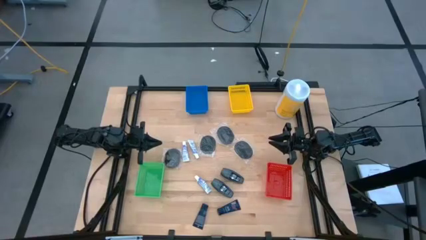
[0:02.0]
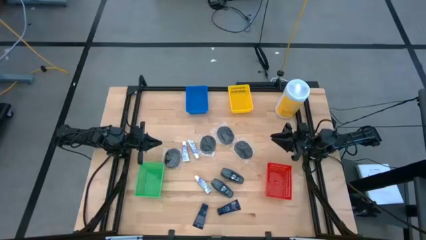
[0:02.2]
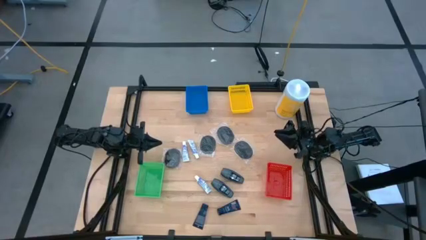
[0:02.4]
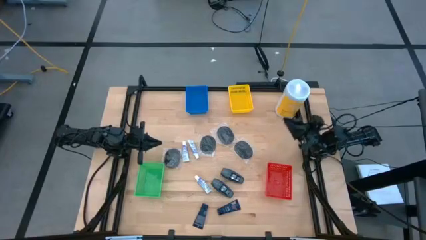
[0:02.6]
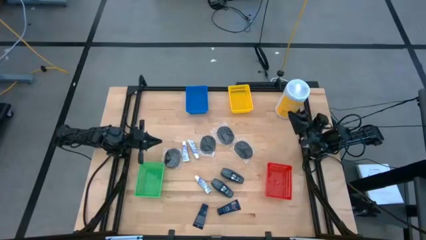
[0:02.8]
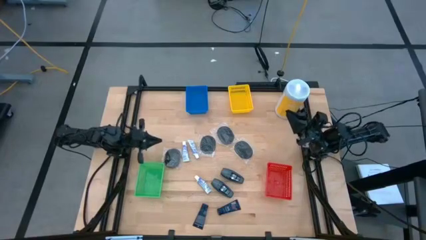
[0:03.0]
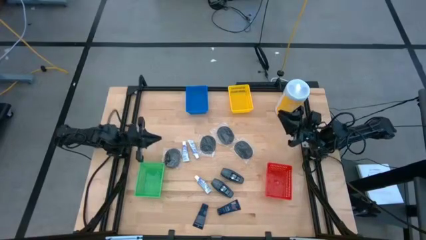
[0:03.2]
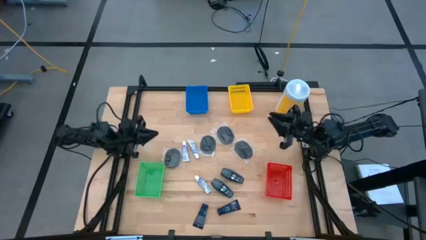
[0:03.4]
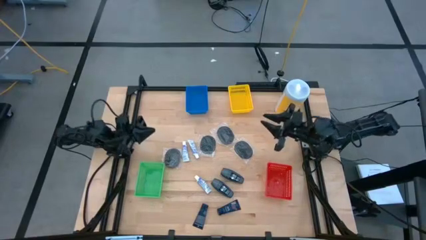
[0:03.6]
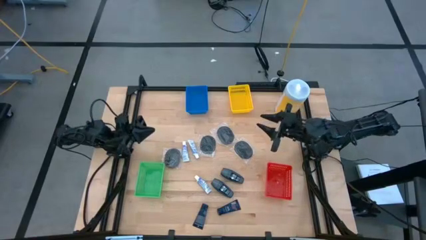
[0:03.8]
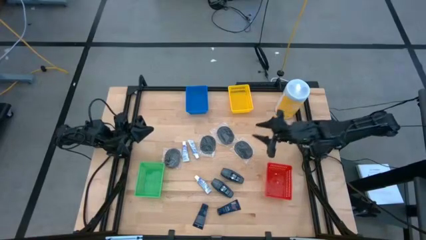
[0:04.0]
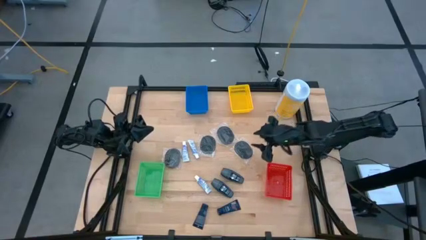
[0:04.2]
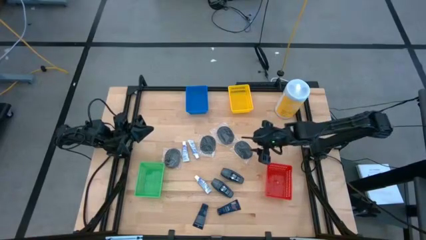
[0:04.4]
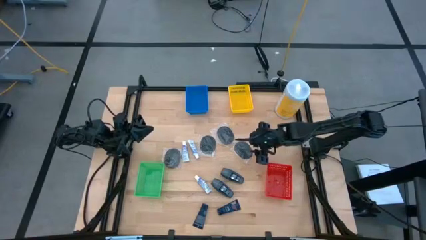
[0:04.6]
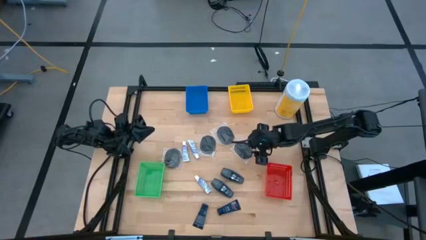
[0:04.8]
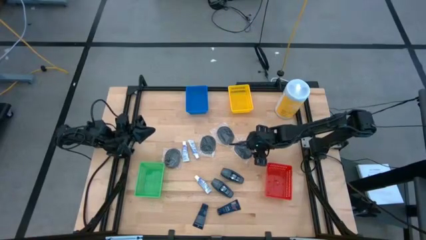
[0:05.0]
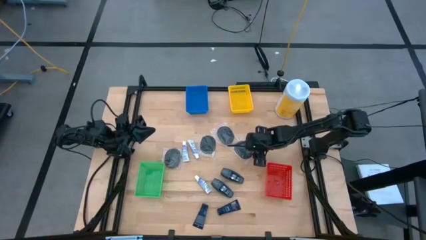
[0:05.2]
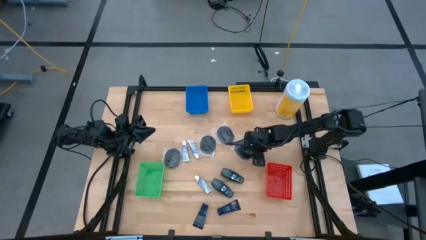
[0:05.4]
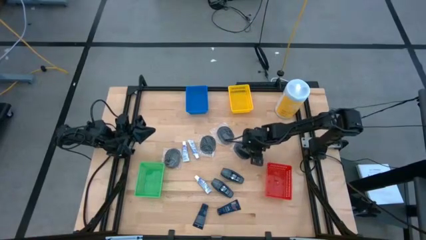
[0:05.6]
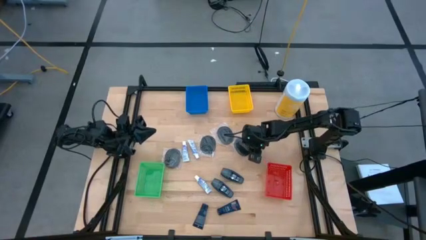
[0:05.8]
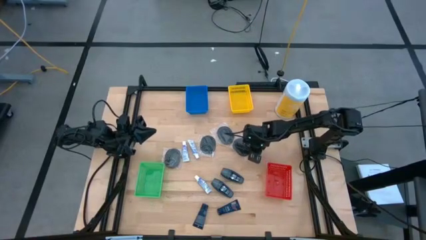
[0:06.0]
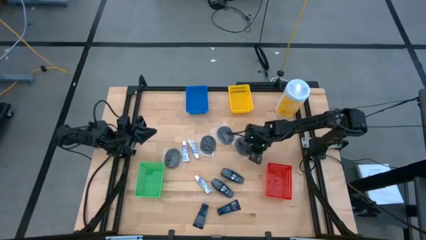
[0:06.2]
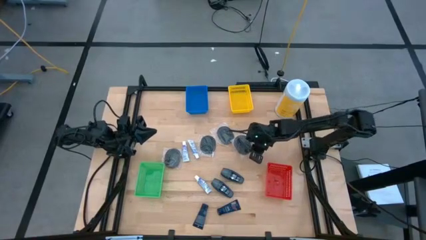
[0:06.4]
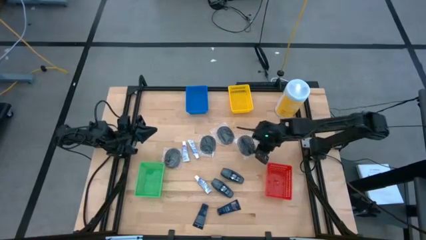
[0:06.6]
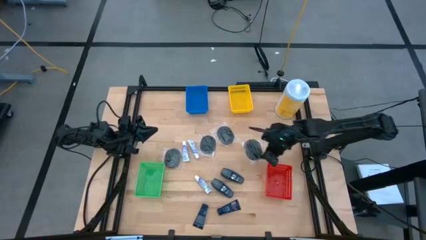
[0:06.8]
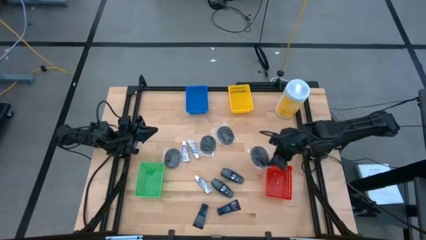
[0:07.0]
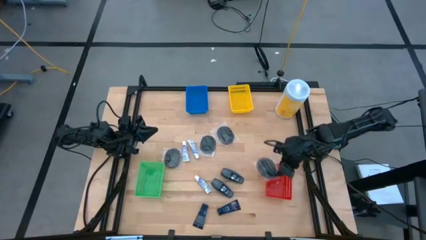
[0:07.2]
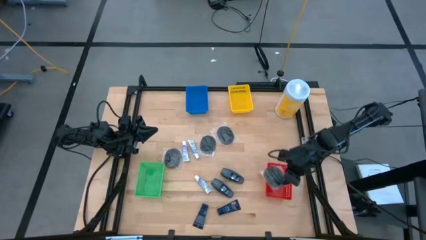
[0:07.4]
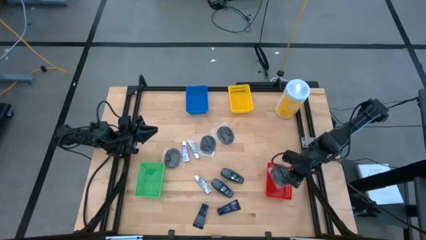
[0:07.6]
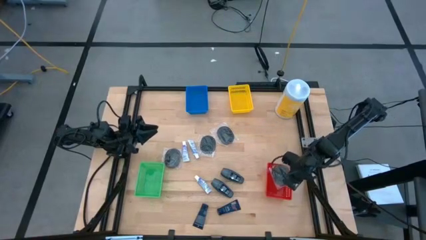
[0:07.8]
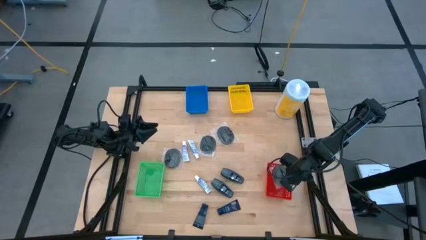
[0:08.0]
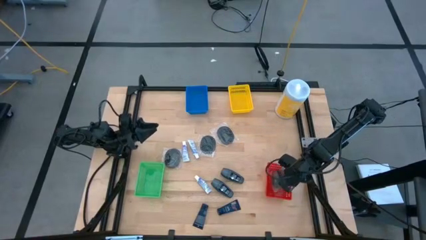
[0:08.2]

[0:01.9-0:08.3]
Task: Pick & Place Travel size toiletries
Put the black hairbrush into the red bin

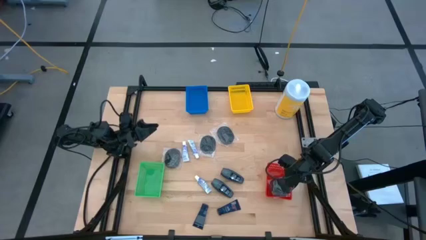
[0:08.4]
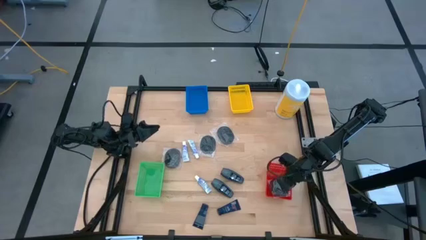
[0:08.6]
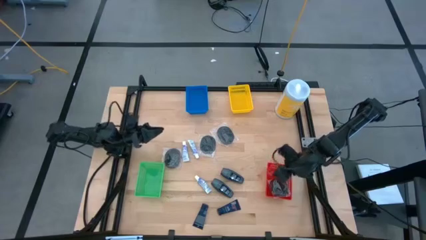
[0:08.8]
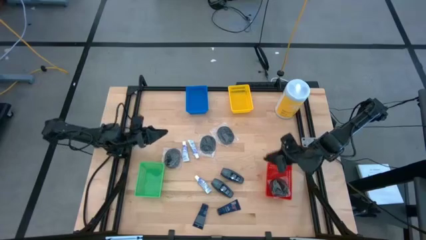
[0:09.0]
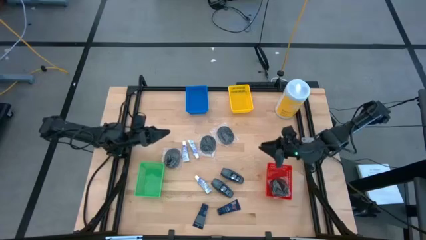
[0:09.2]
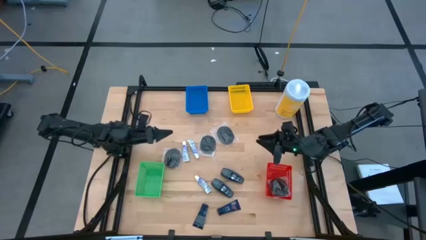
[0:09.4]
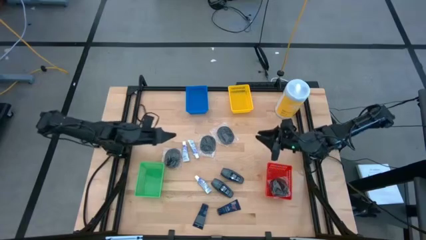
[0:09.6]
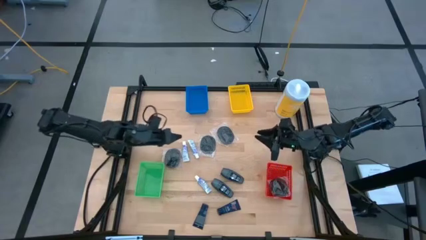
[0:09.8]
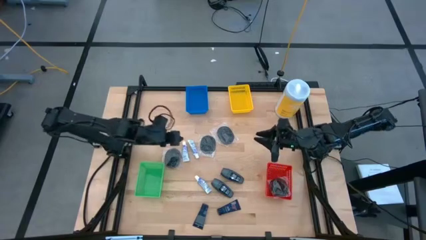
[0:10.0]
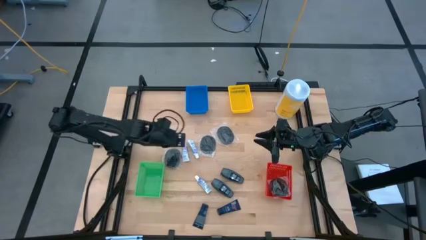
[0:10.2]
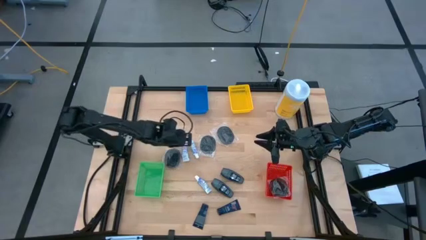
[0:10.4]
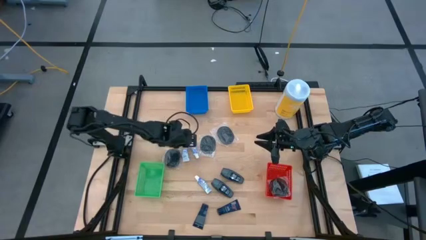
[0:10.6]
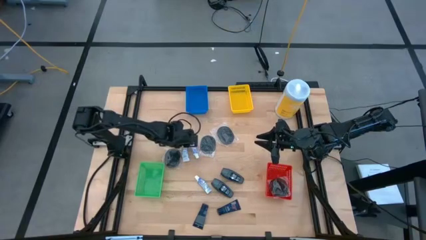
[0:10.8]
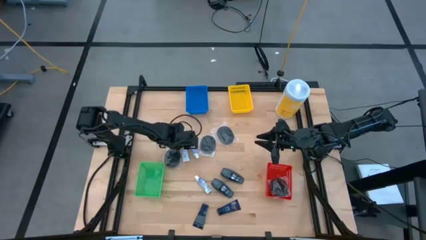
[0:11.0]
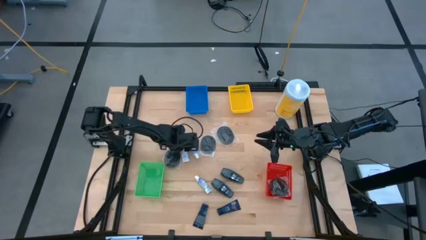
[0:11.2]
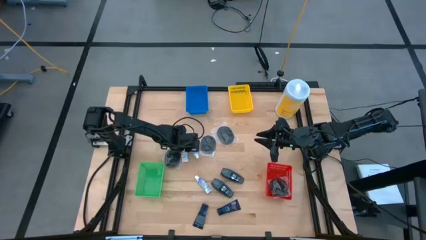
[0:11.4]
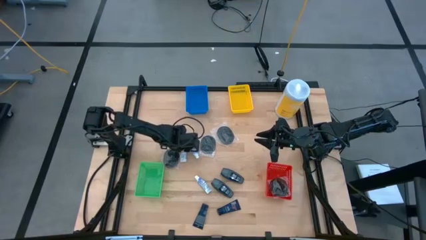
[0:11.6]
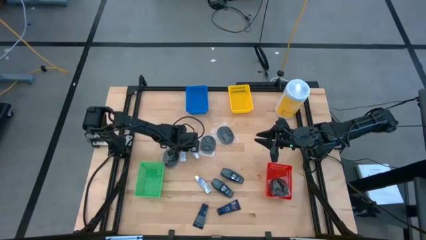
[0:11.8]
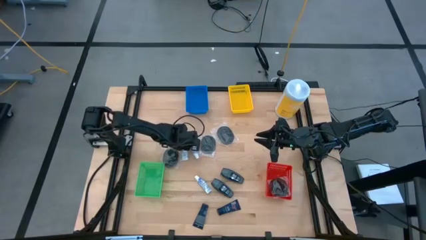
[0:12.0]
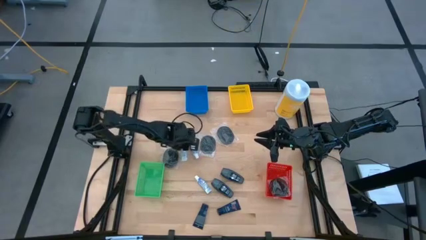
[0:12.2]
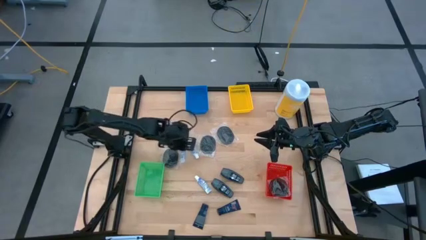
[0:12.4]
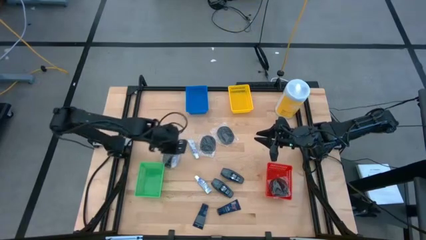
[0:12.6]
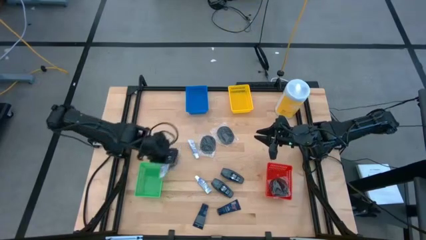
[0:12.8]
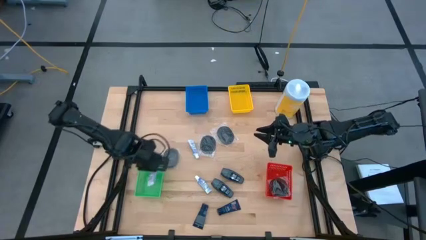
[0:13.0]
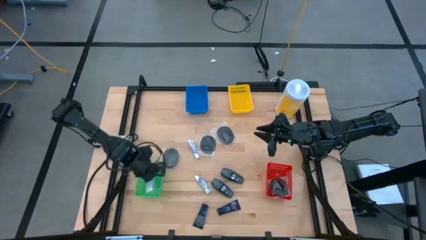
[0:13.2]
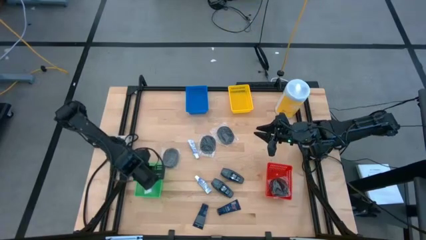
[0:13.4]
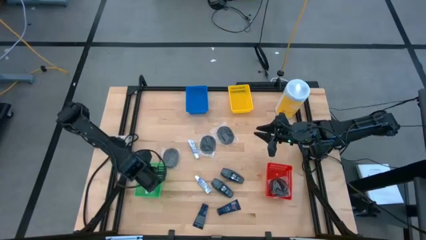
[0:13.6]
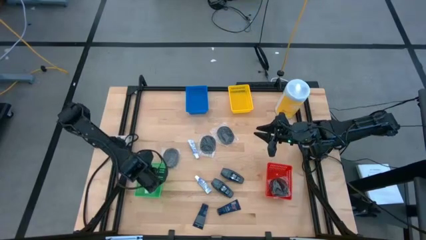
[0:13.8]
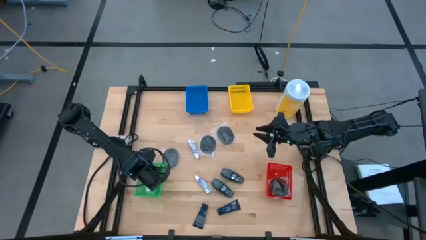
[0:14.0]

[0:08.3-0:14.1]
Put the white toothpaste into the green bin

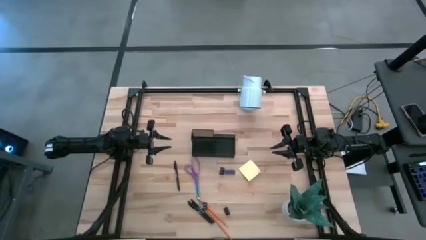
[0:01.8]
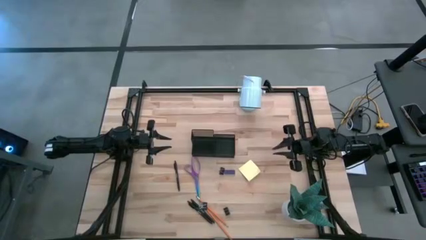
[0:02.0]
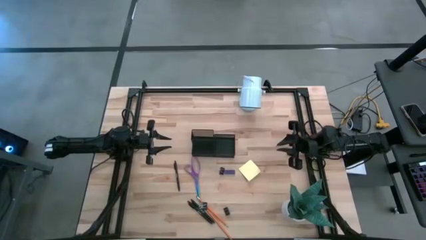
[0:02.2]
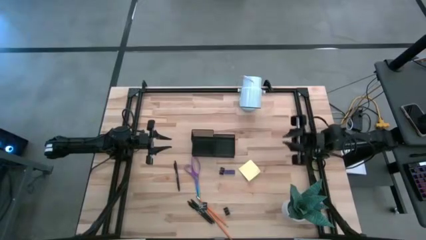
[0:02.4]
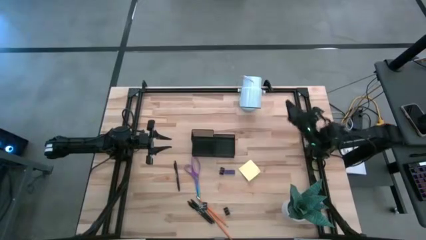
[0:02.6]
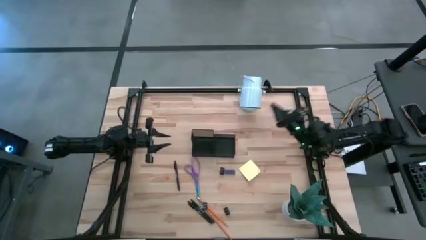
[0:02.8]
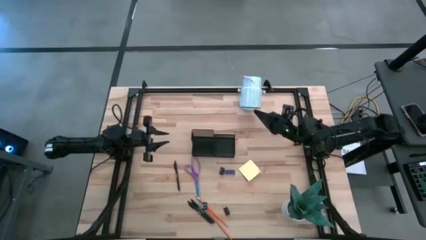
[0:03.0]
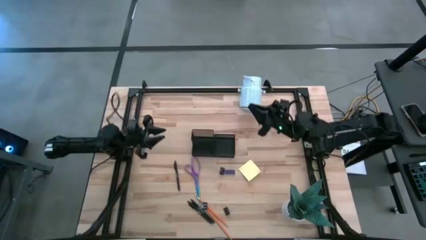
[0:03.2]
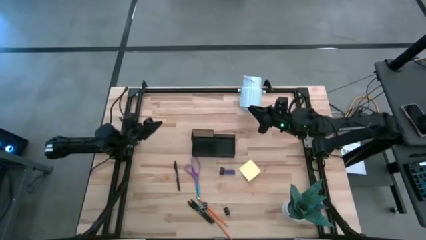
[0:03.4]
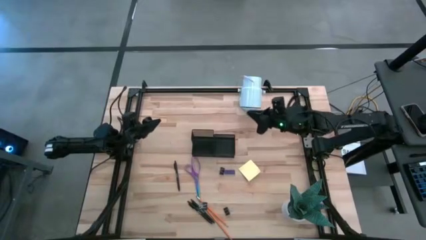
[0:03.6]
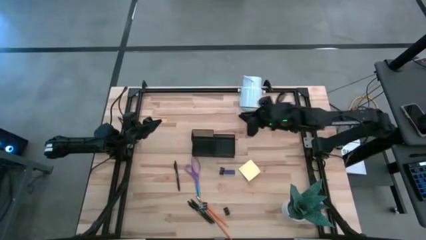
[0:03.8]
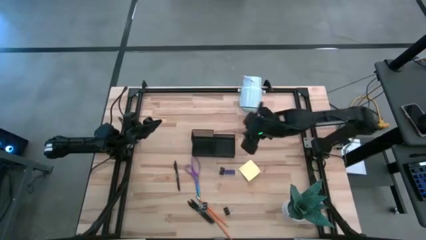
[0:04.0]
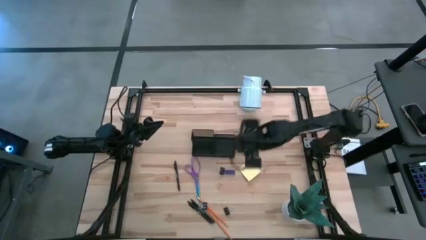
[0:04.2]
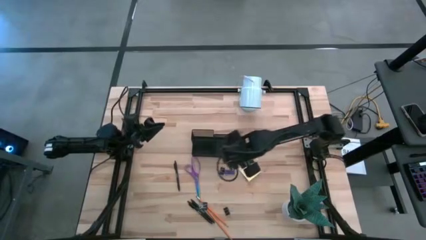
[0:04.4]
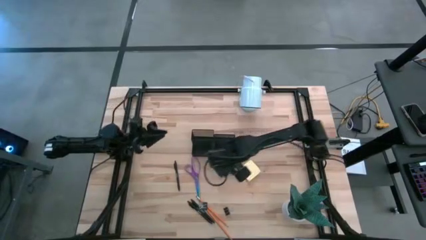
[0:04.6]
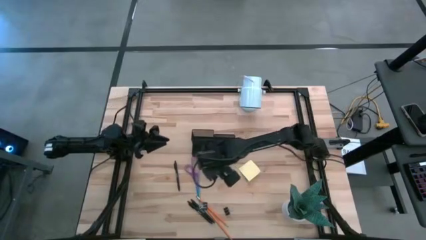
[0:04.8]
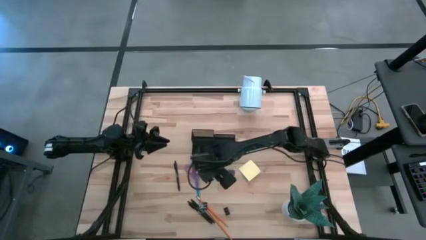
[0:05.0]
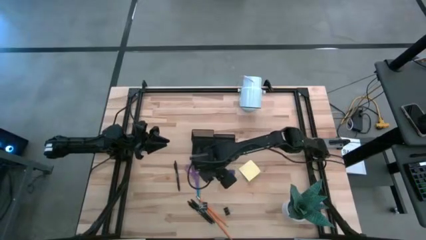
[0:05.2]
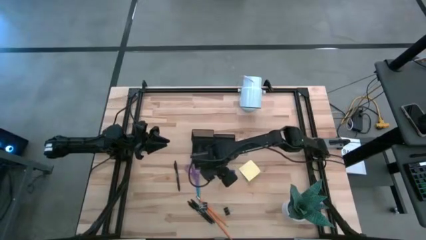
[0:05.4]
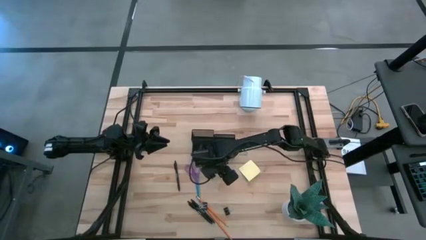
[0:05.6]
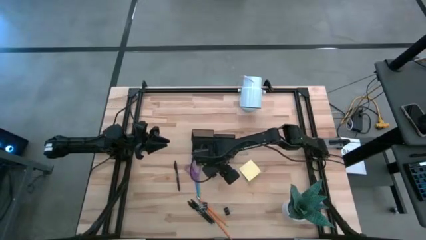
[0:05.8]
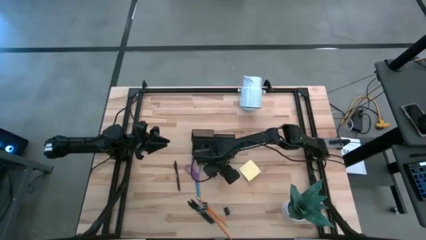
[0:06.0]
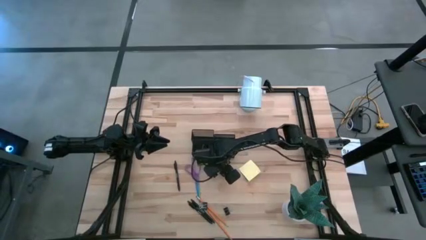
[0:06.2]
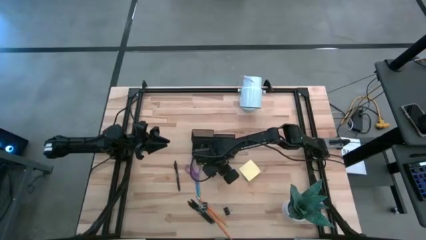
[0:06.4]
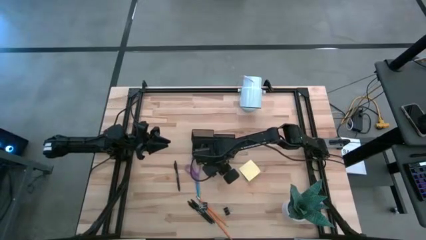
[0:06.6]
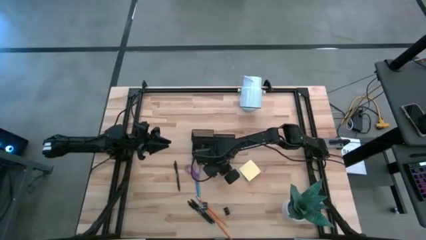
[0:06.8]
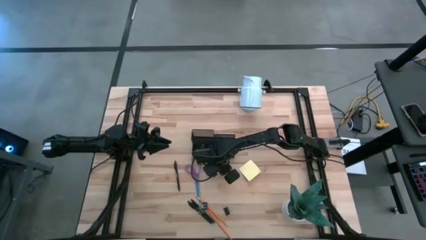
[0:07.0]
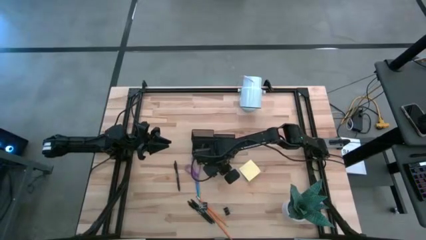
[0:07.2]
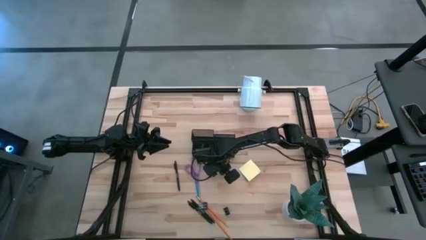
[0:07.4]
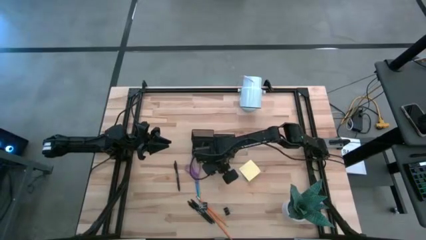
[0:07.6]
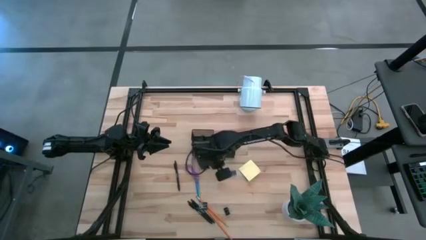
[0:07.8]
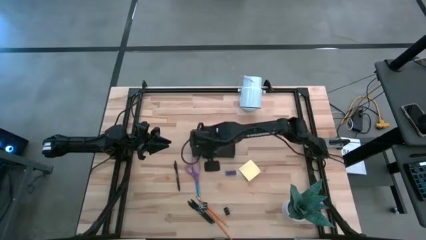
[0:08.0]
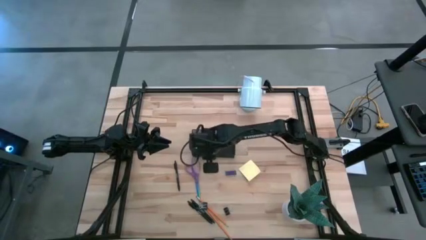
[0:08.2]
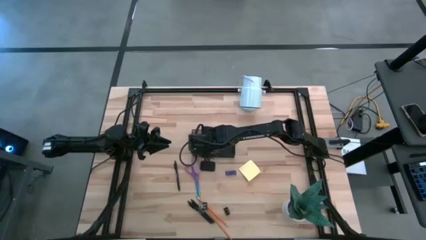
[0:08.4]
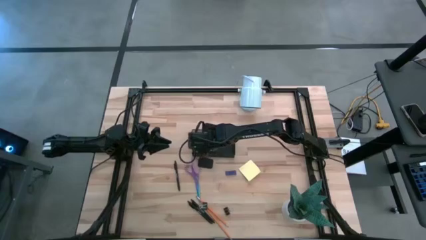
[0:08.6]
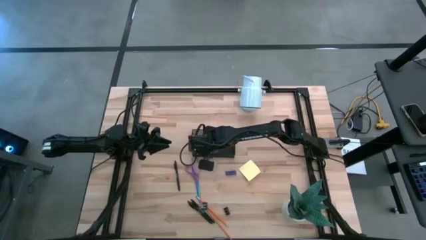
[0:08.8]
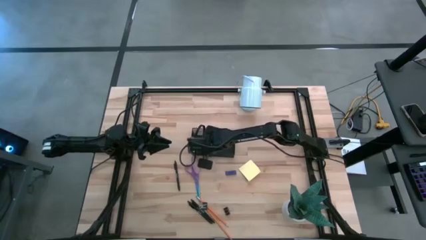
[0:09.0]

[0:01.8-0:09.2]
Task: Pick and place office supplies into organizer
Put the top black binder clip into the black desk organizer
